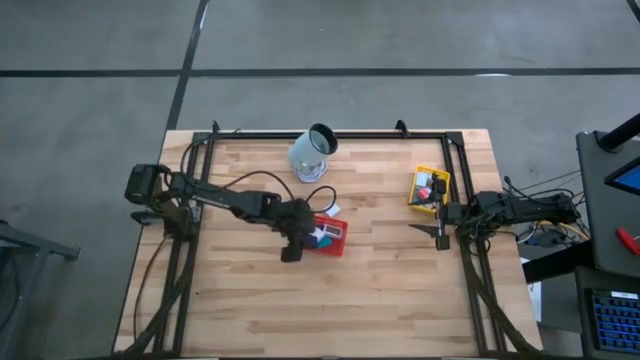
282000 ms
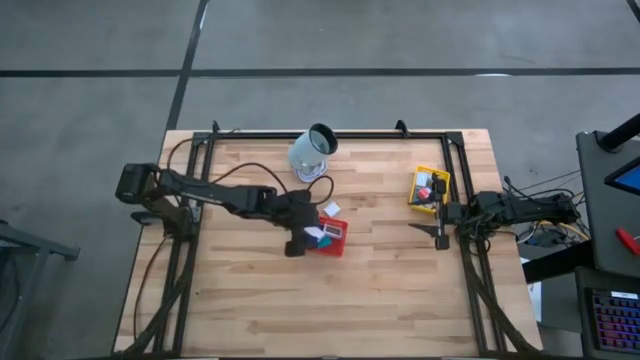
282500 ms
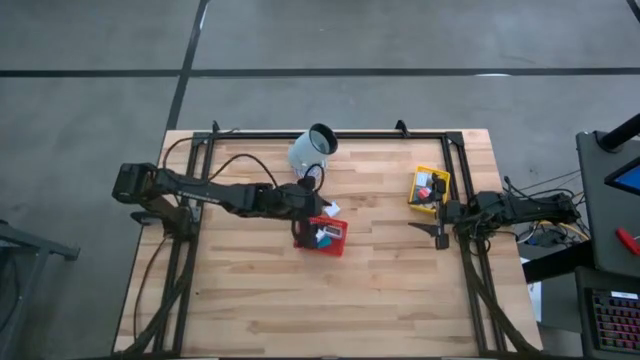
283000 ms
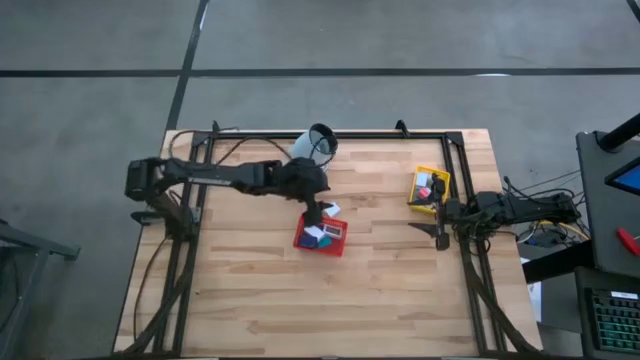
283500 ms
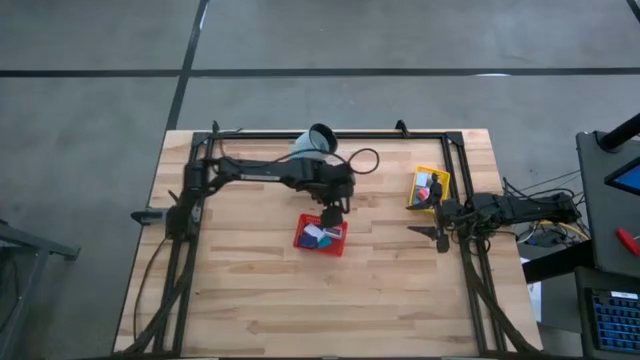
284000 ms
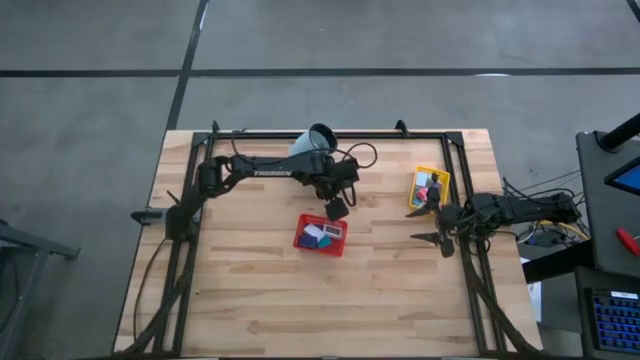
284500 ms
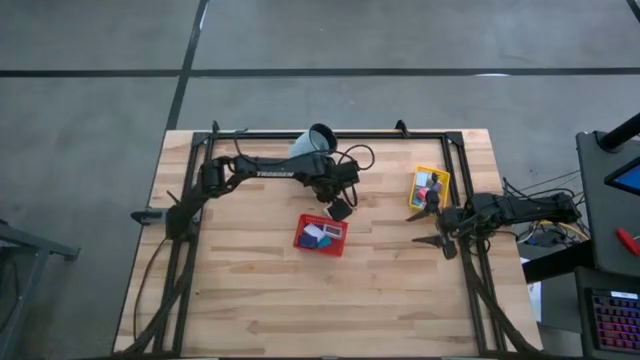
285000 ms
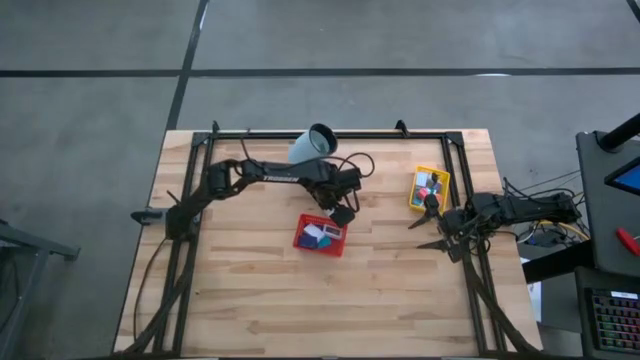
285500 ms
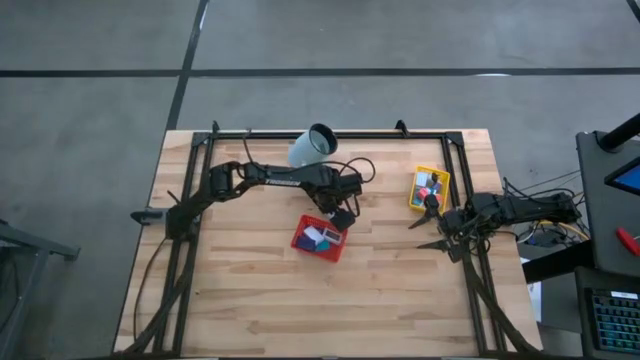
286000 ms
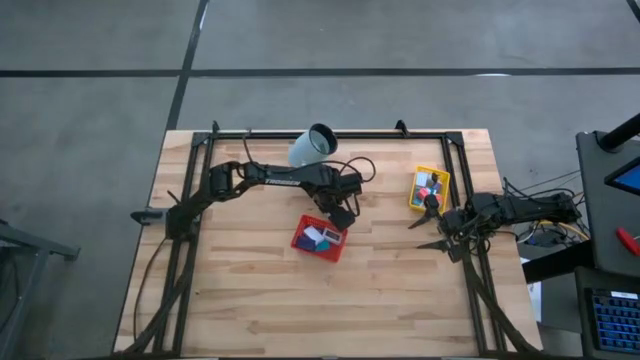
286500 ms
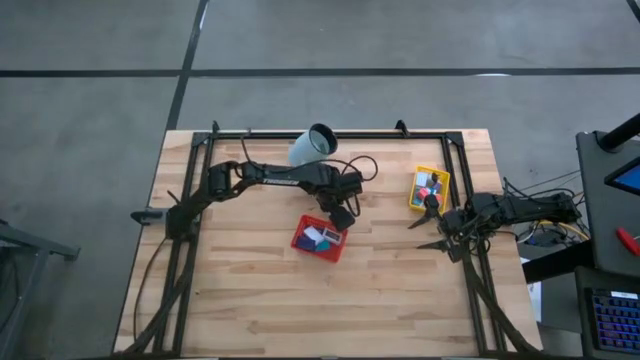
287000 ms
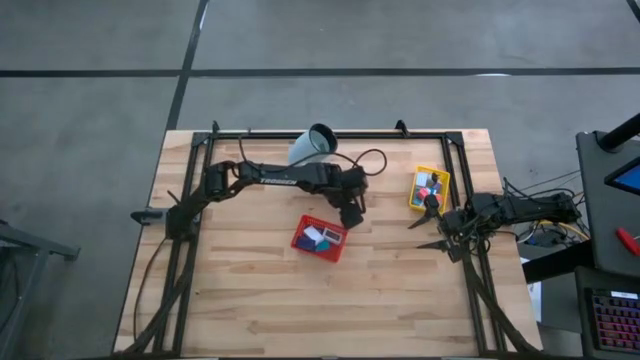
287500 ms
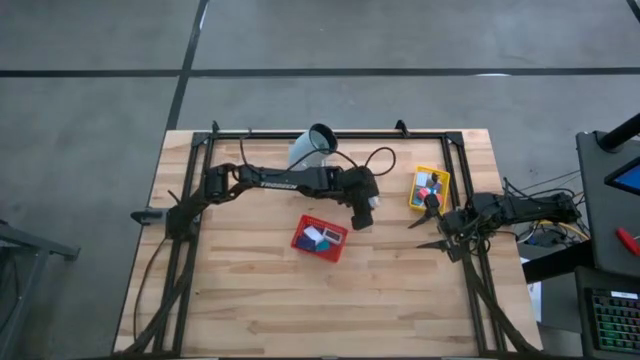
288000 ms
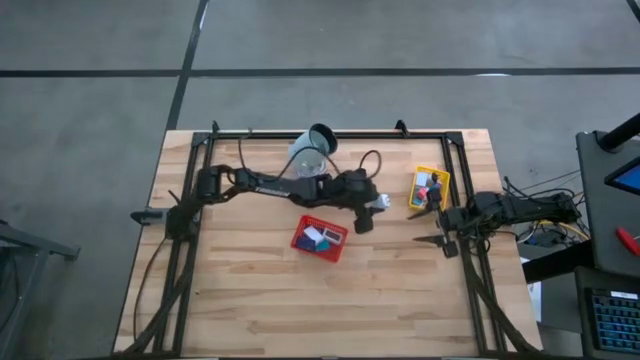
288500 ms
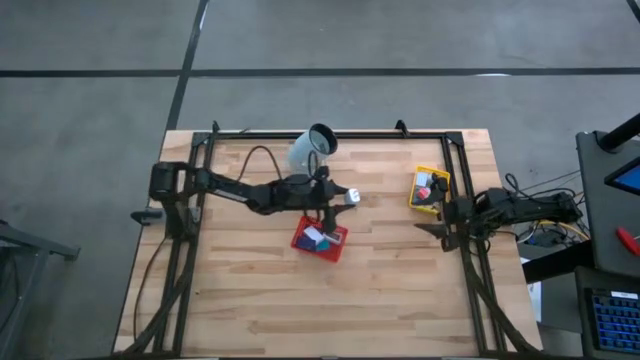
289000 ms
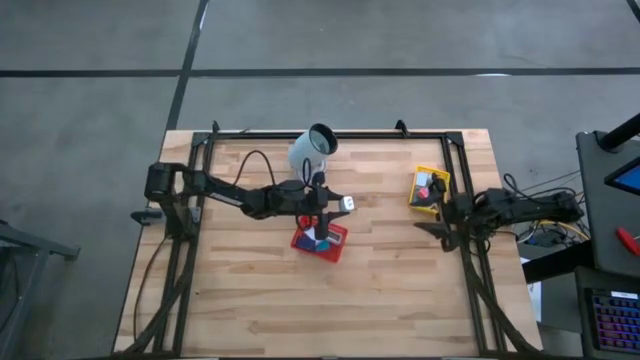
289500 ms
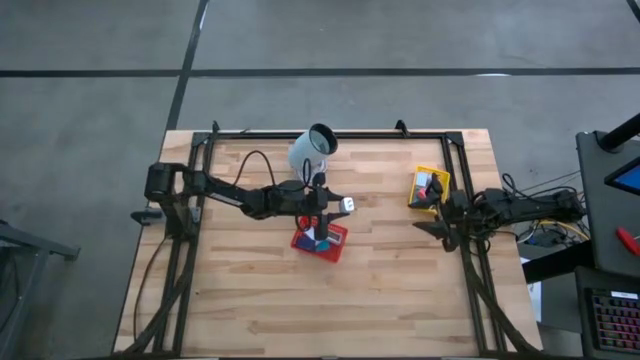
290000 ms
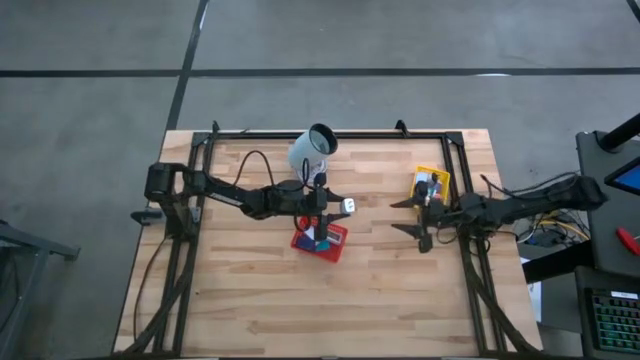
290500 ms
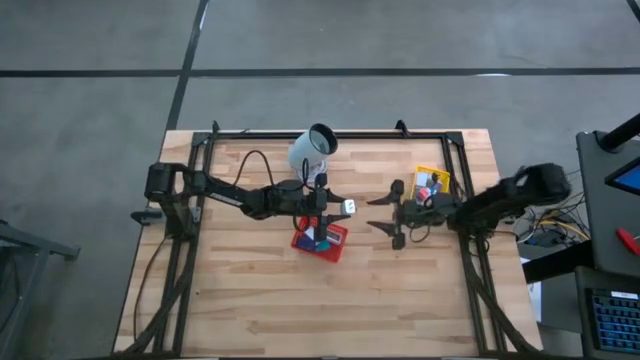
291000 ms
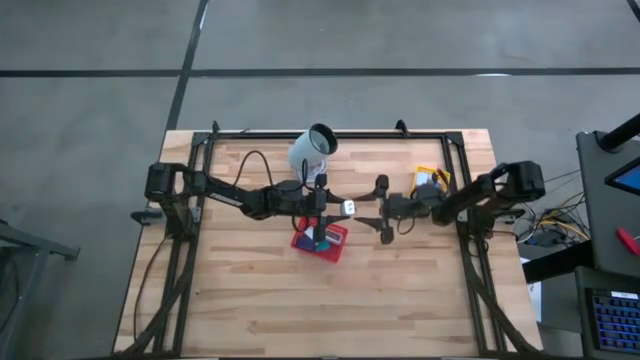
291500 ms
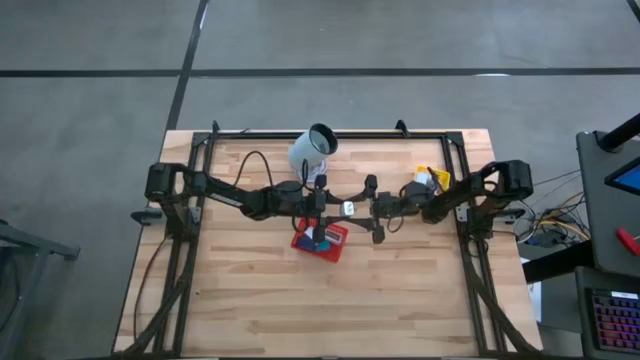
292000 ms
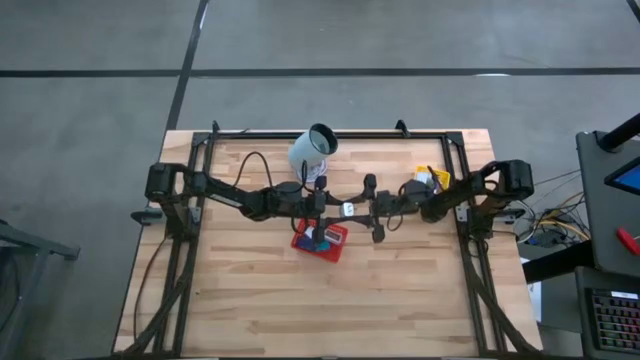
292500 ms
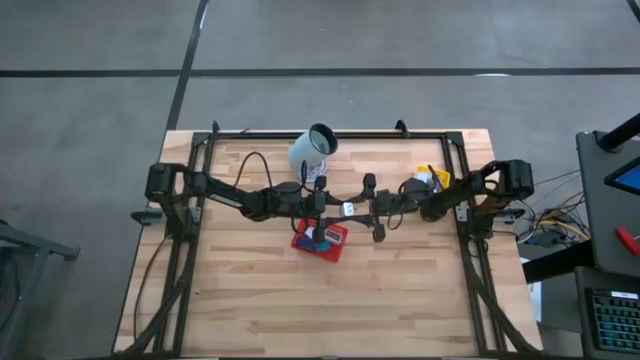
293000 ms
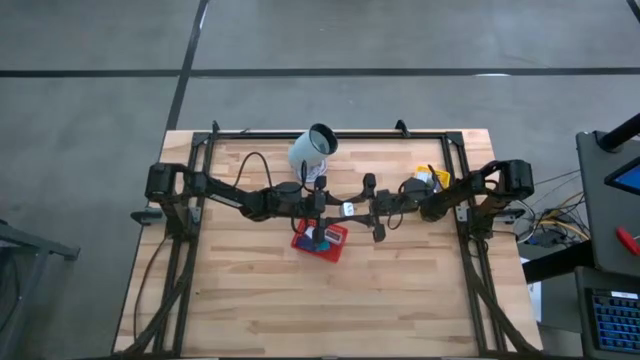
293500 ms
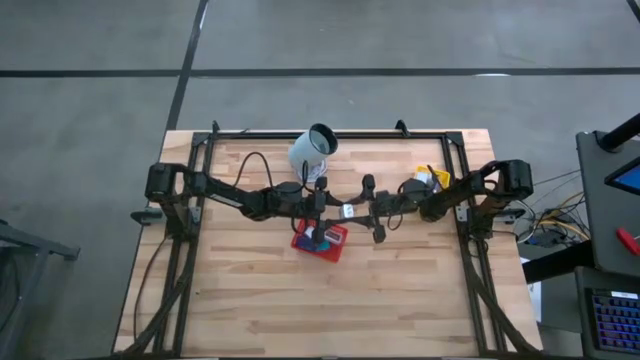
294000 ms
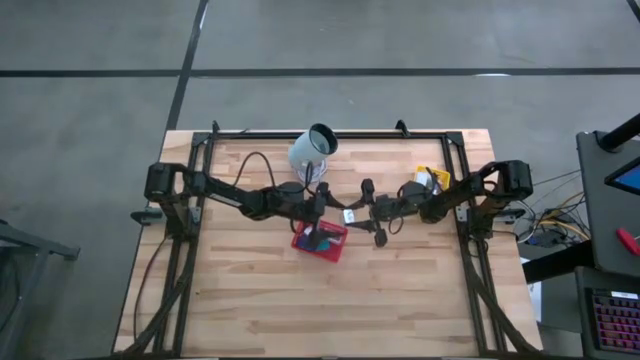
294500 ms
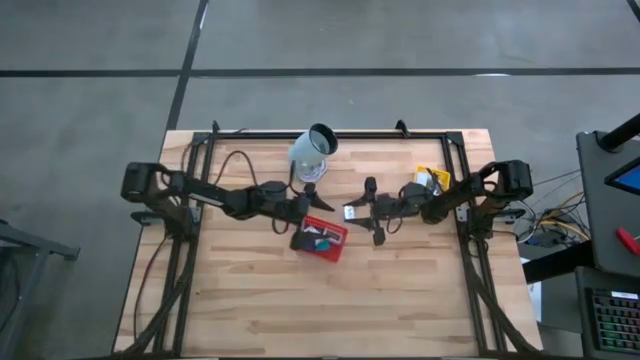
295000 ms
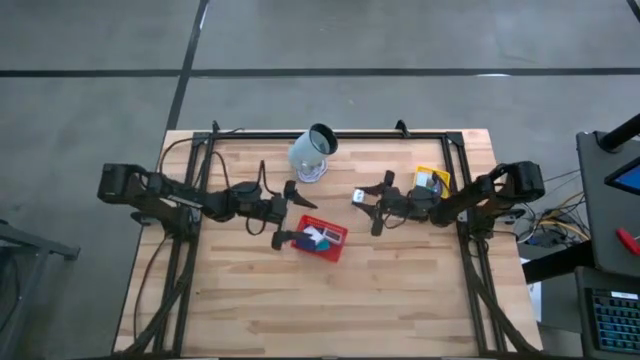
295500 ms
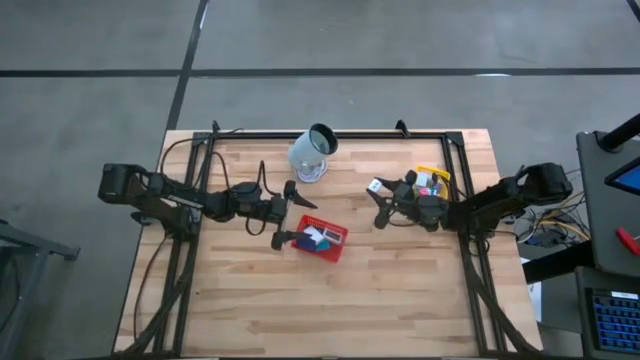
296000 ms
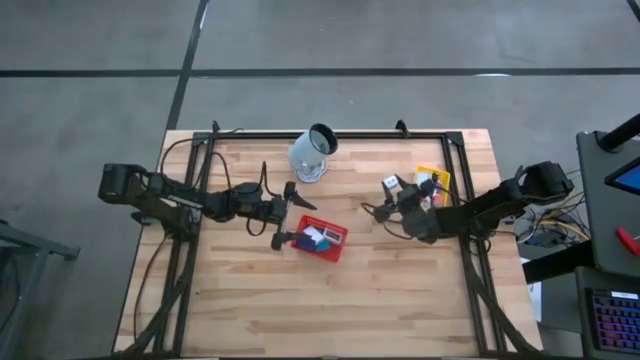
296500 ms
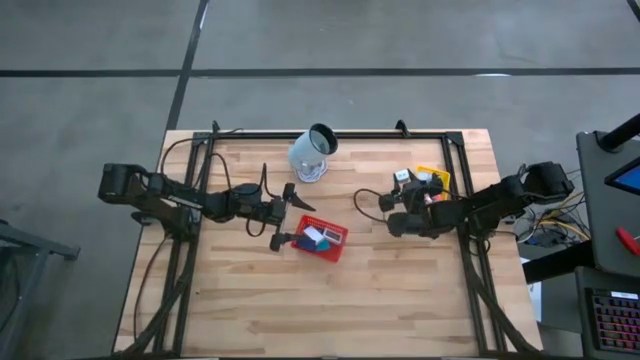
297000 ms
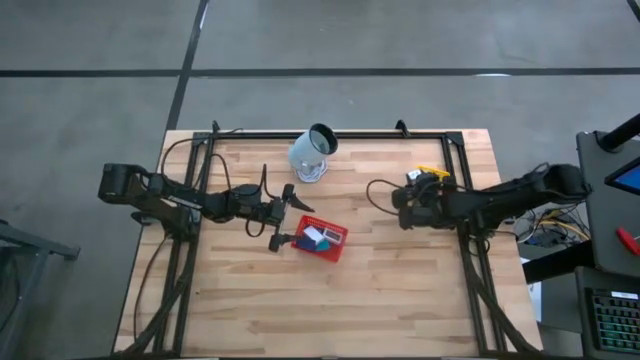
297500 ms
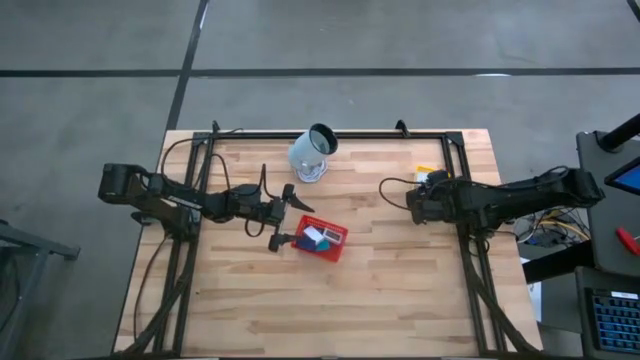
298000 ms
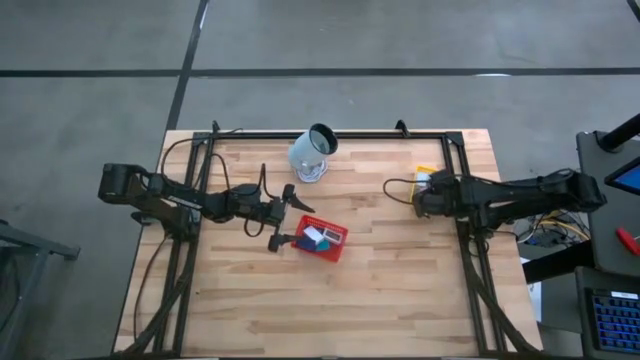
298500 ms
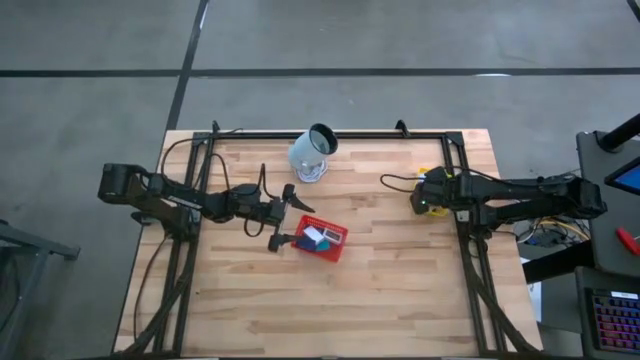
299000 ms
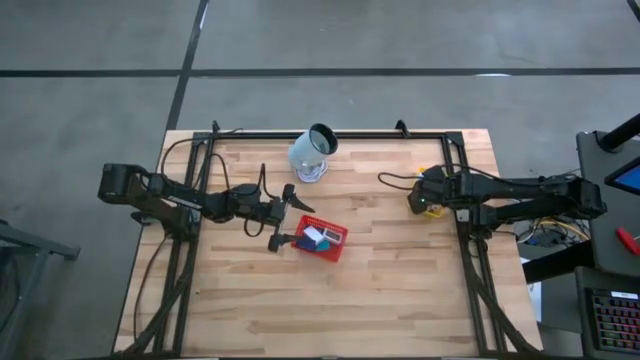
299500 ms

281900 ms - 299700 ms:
Task: Pick & Place Office items
Put the white charger adapter into the yellow basket

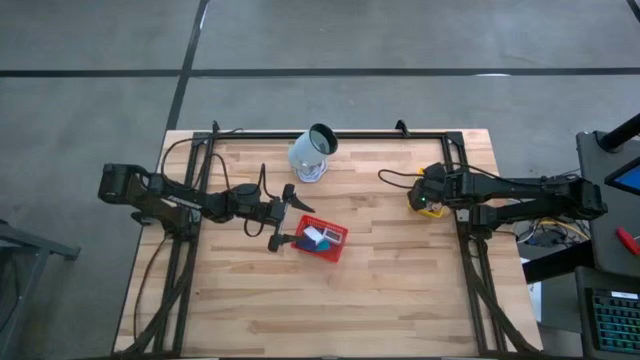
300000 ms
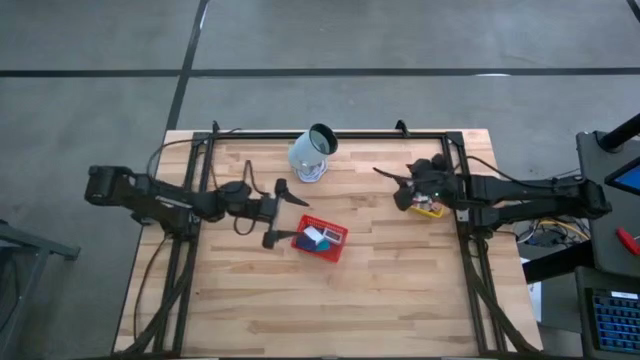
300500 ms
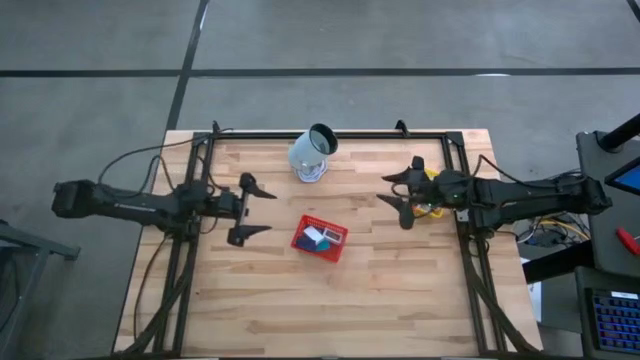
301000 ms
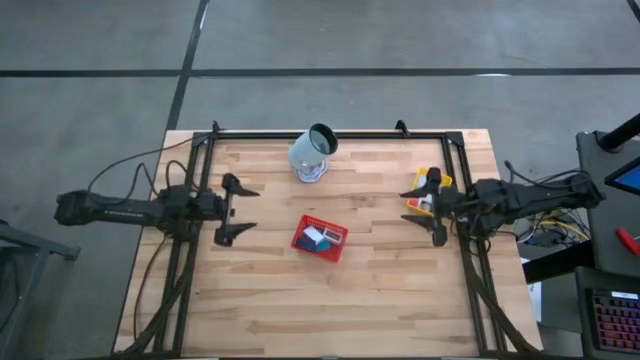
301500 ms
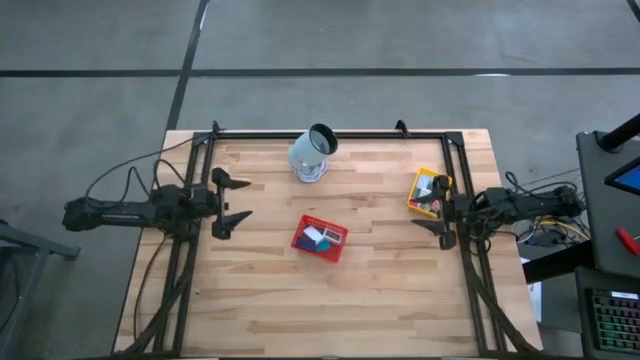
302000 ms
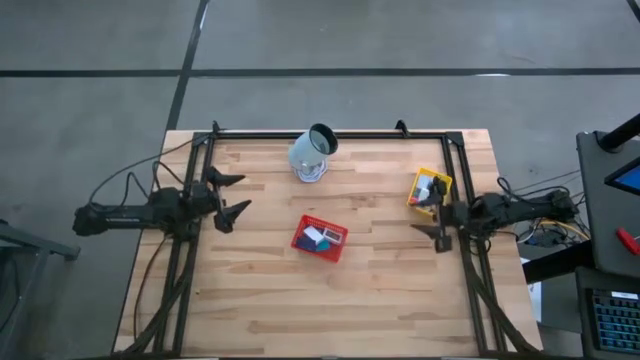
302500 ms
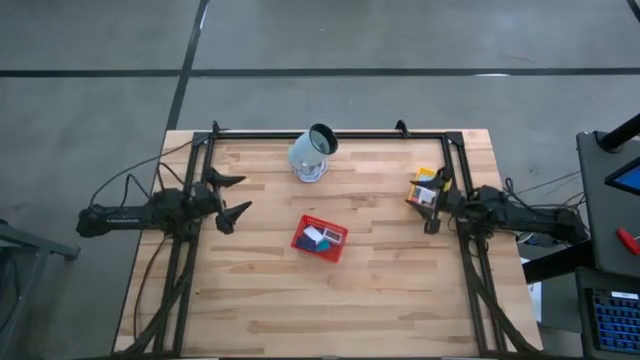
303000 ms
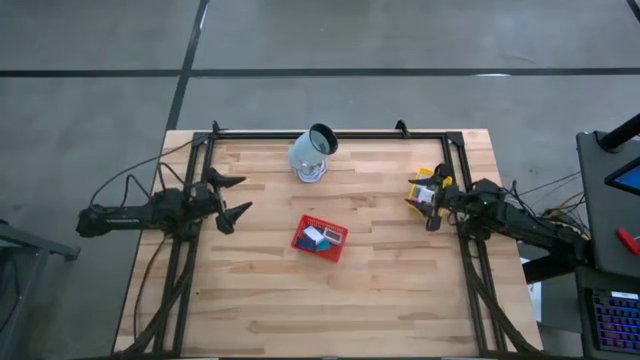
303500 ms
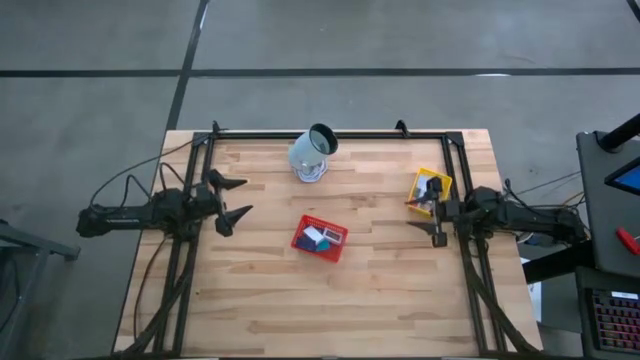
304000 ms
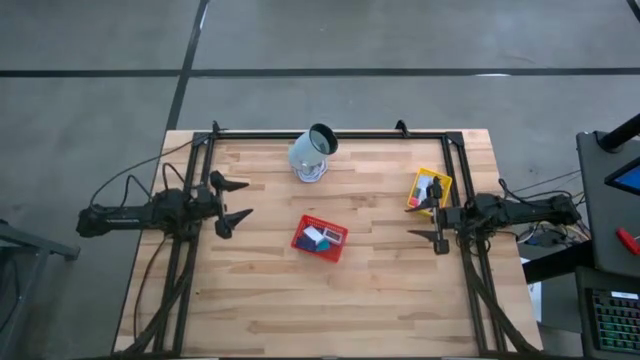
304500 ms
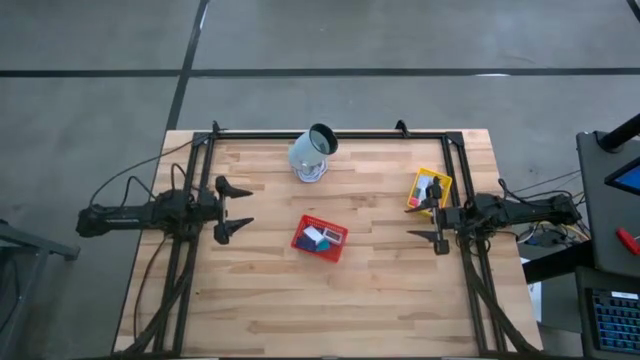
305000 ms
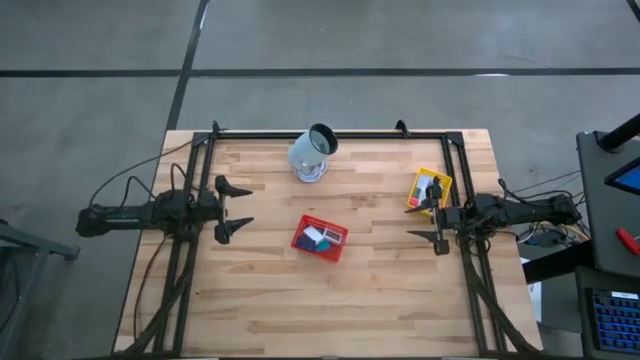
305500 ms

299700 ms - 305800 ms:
Return to Home Position
